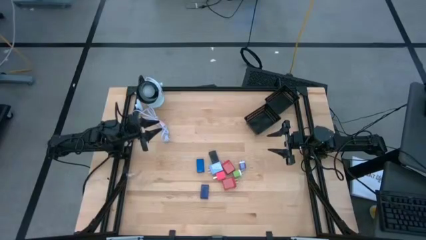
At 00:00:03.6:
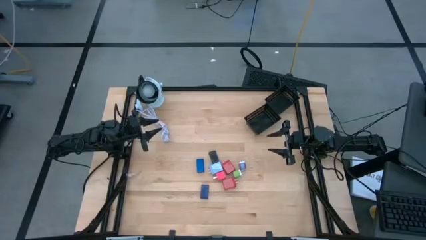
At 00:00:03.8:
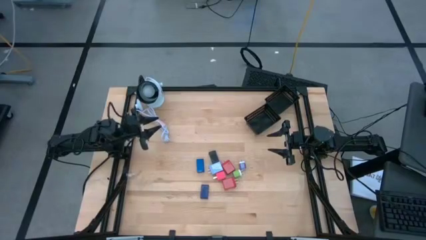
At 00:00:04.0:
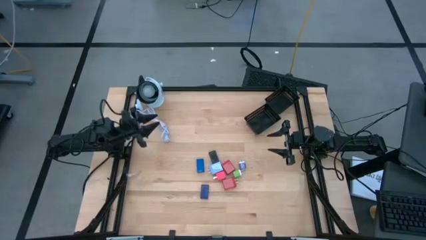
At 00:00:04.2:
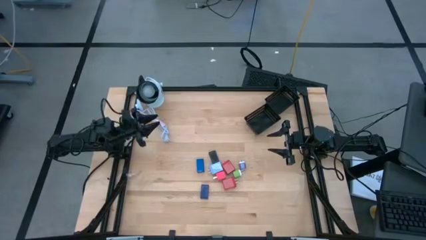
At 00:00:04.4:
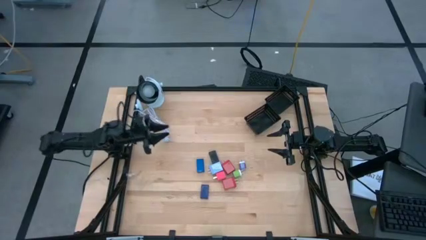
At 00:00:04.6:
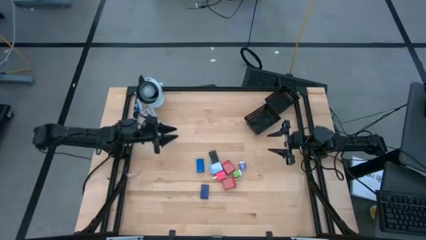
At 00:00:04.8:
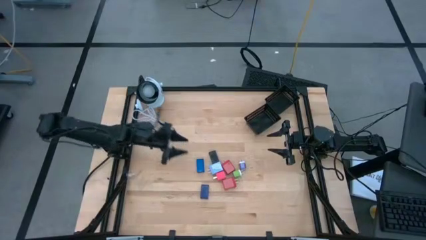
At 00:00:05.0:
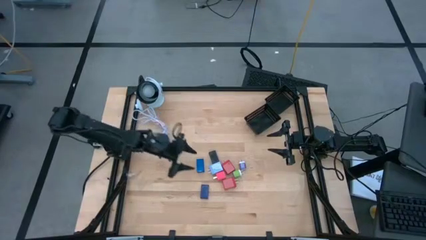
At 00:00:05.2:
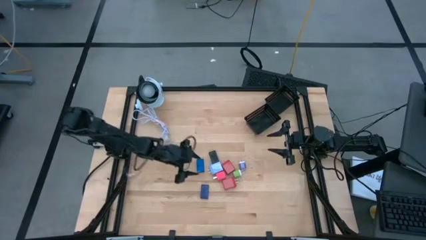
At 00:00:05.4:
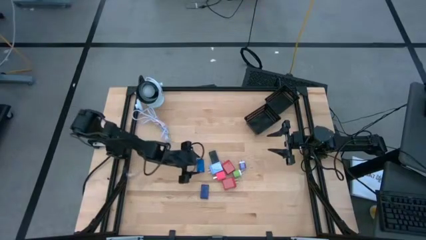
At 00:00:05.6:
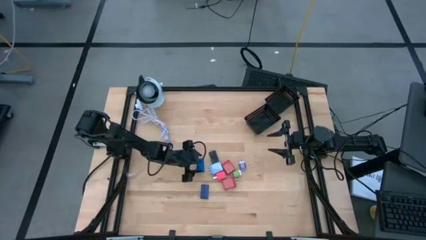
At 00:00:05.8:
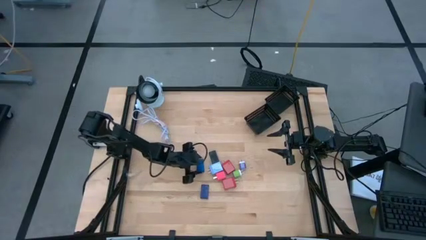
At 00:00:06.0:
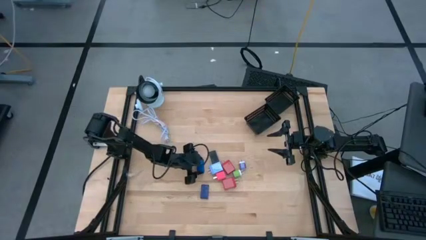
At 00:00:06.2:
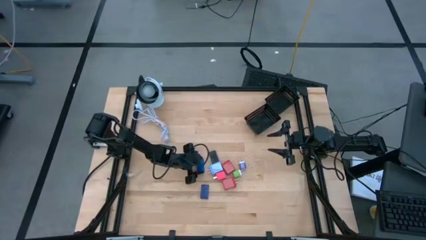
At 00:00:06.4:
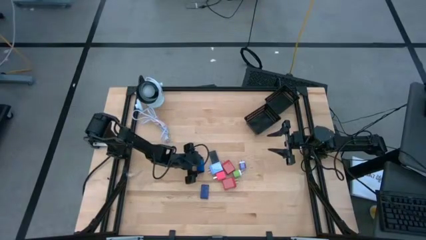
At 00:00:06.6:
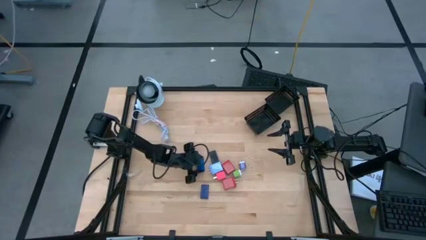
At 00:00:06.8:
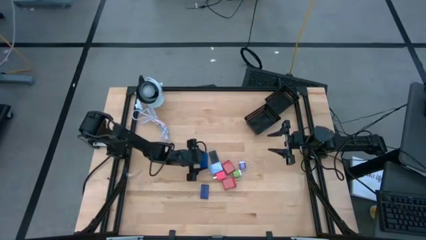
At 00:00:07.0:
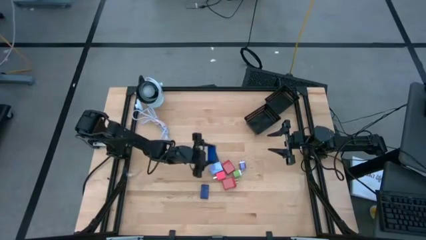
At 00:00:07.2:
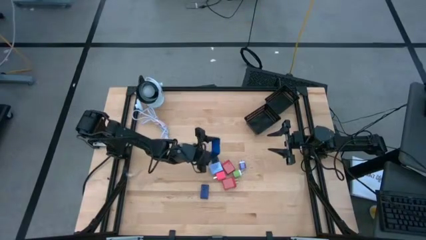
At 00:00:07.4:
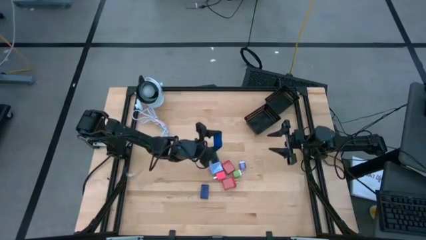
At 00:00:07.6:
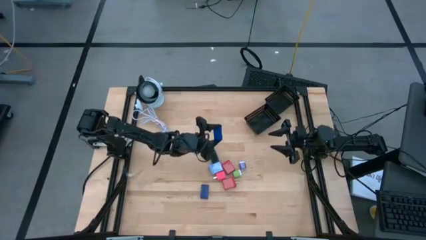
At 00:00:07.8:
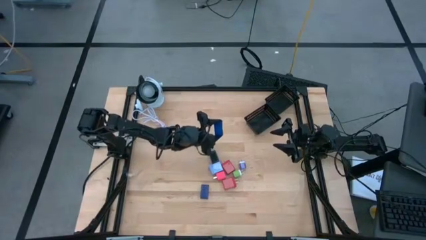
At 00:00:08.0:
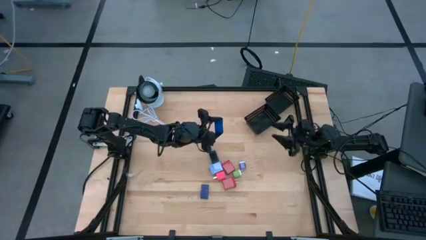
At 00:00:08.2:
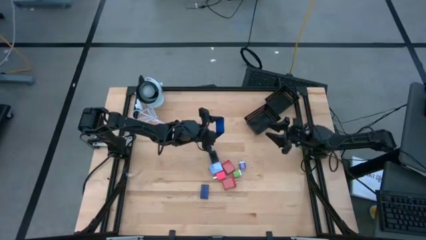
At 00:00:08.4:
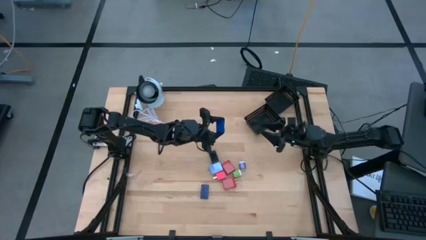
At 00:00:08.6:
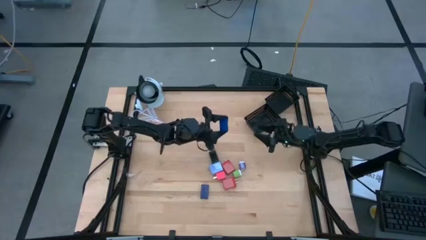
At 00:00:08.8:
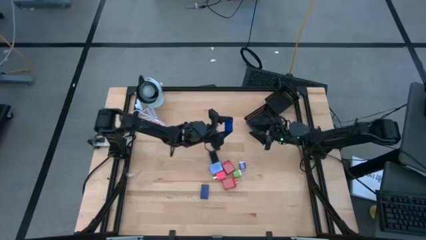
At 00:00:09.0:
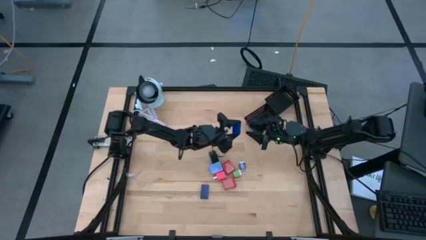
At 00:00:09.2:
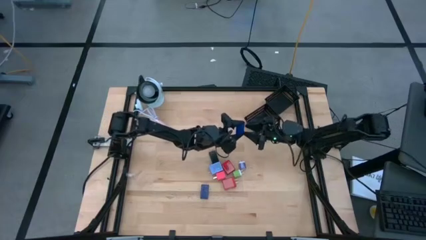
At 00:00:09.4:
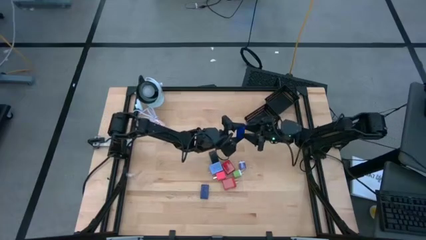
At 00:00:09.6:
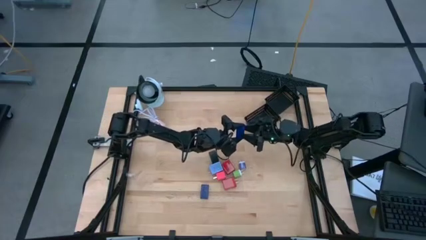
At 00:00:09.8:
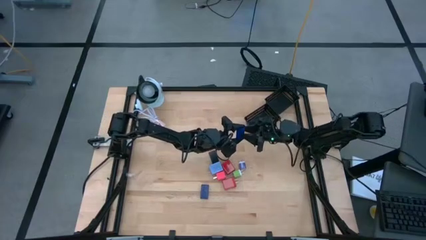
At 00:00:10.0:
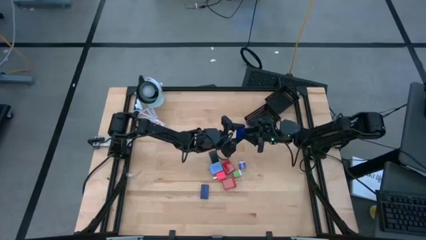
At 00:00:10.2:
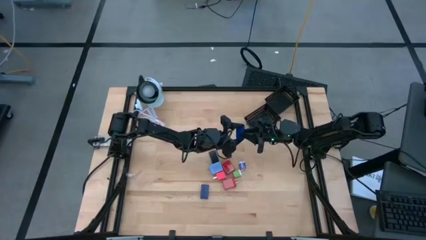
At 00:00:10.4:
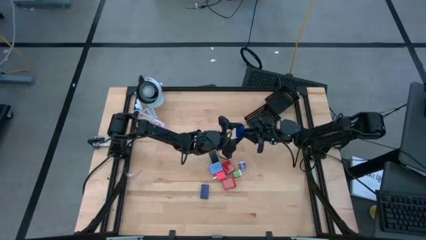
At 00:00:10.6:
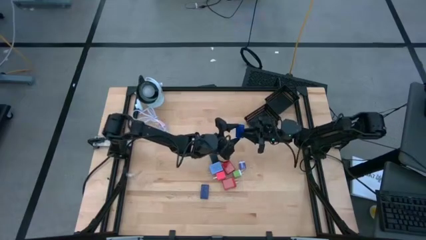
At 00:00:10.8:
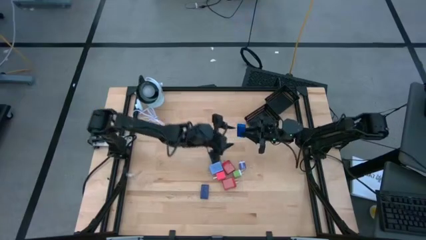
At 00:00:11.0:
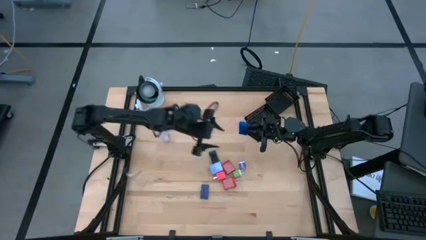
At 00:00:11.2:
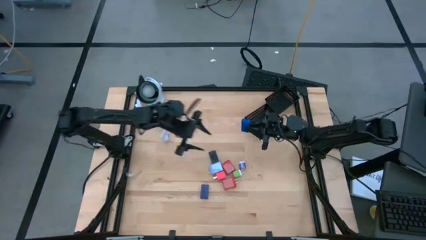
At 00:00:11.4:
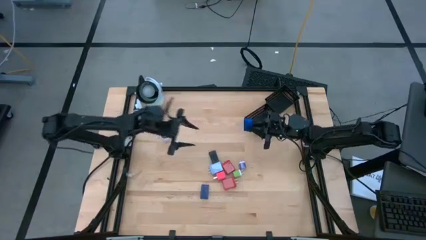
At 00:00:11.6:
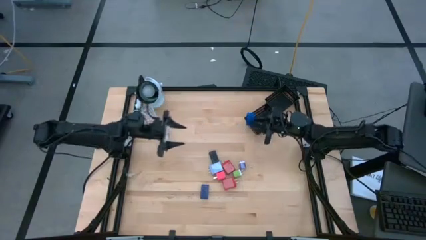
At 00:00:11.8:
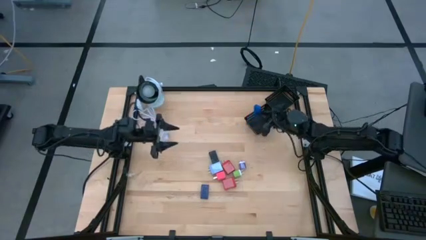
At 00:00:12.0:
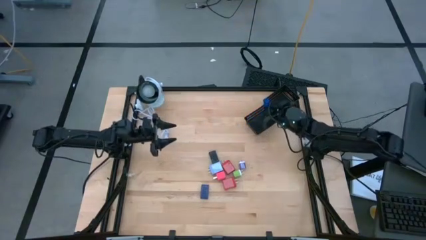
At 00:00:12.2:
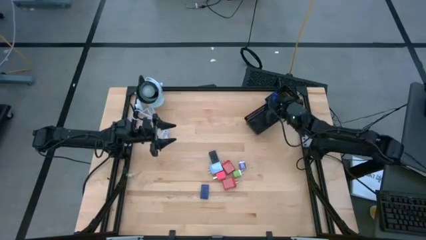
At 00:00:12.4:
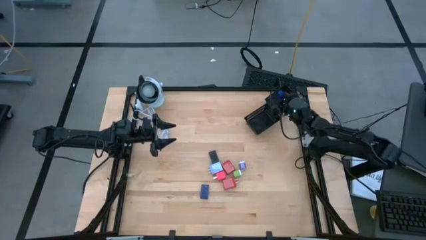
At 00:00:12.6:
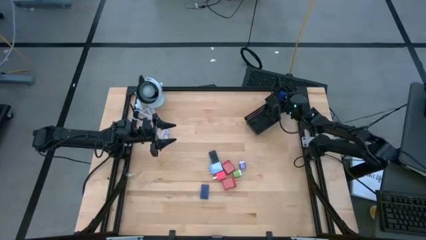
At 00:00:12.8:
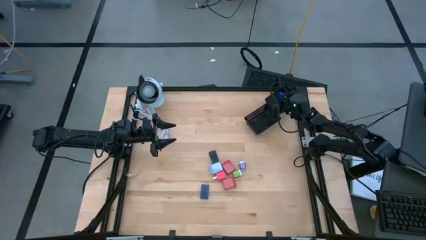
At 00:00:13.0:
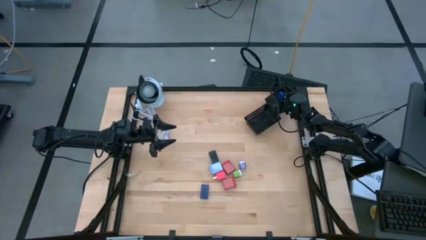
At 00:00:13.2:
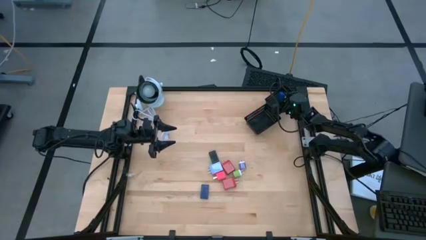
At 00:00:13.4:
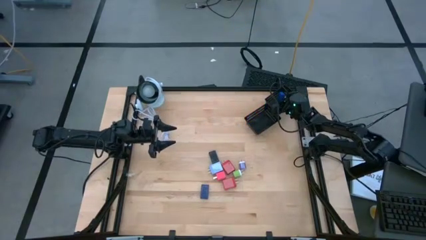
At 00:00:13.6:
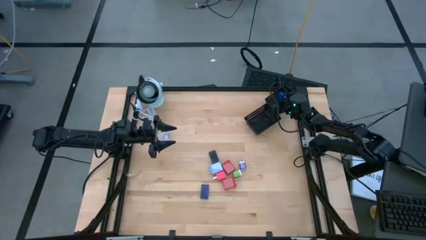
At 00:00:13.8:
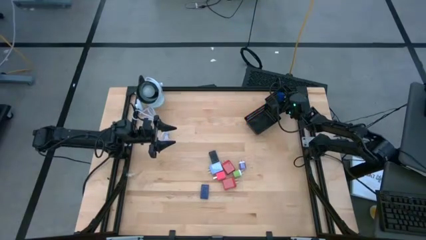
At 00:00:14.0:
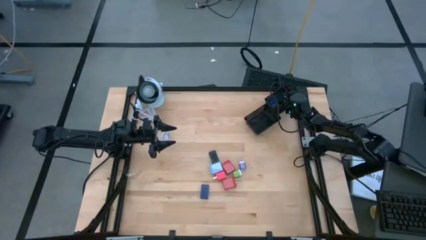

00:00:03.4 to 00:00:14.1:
Task: Pick & Place Office items
Put the blue digital timer into the top black bin

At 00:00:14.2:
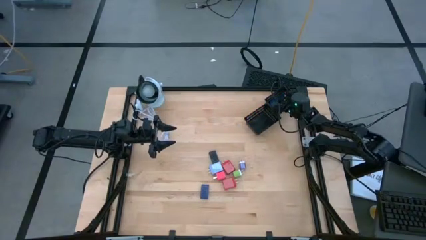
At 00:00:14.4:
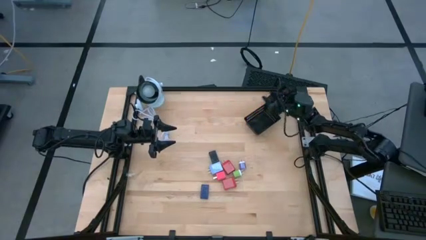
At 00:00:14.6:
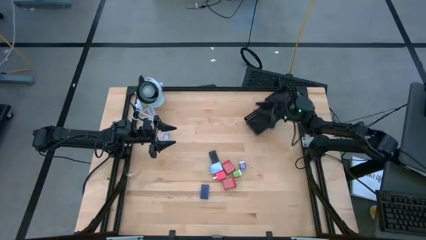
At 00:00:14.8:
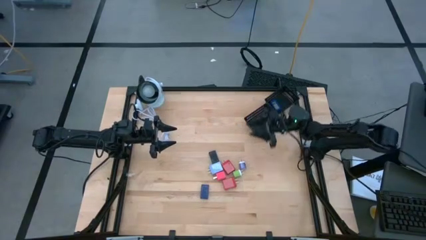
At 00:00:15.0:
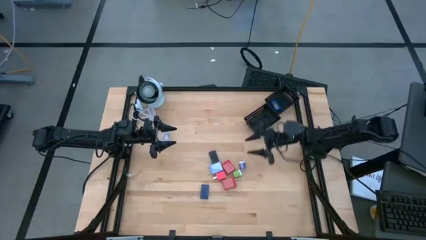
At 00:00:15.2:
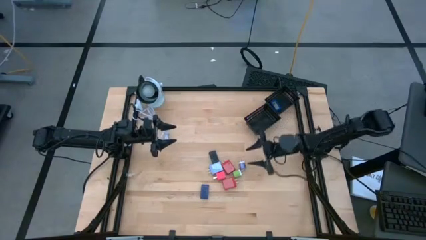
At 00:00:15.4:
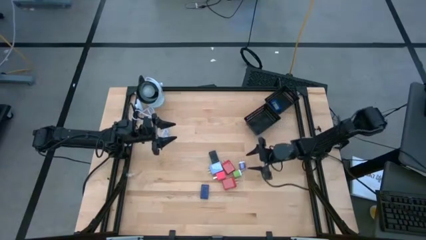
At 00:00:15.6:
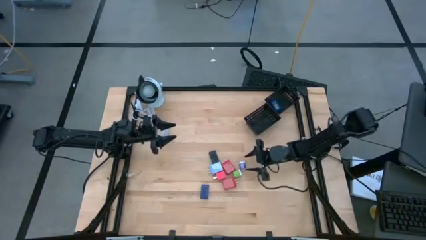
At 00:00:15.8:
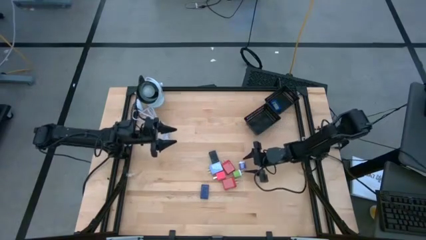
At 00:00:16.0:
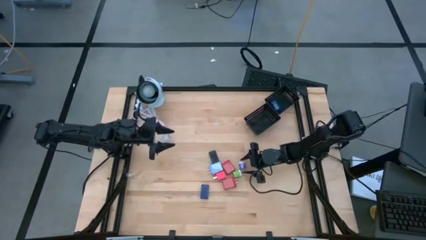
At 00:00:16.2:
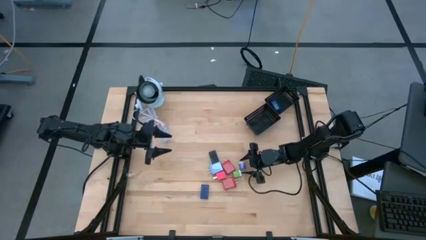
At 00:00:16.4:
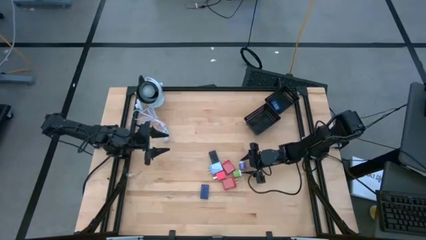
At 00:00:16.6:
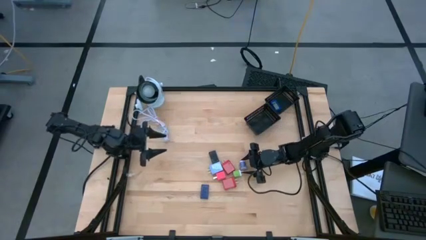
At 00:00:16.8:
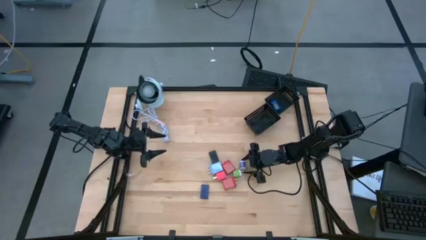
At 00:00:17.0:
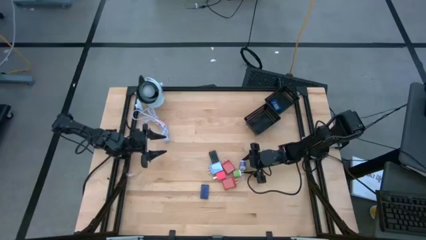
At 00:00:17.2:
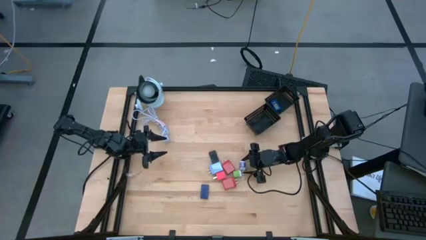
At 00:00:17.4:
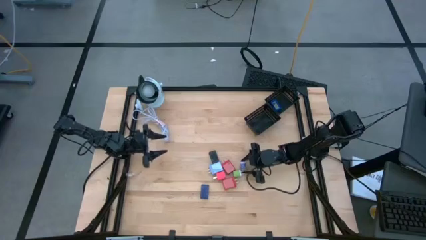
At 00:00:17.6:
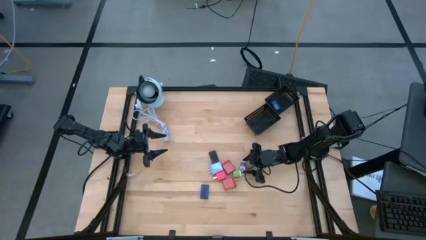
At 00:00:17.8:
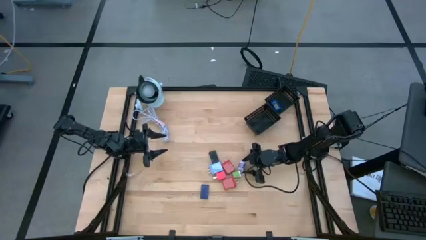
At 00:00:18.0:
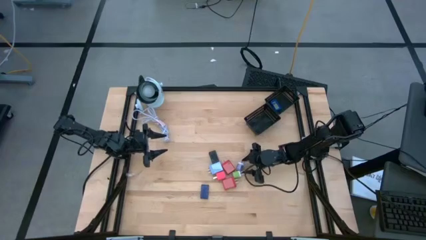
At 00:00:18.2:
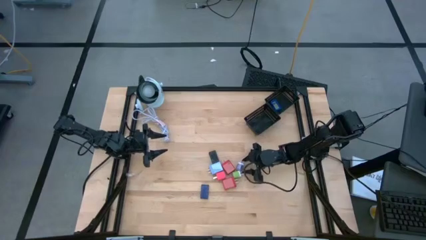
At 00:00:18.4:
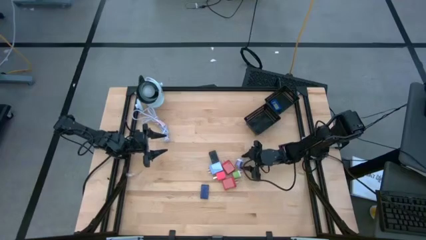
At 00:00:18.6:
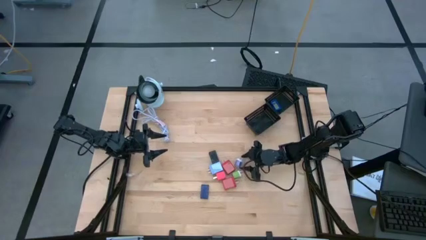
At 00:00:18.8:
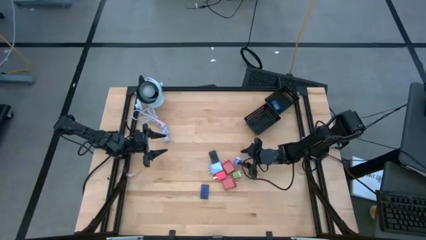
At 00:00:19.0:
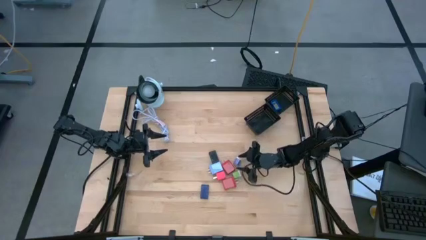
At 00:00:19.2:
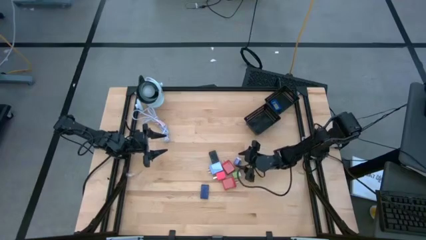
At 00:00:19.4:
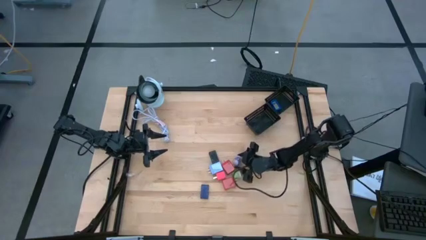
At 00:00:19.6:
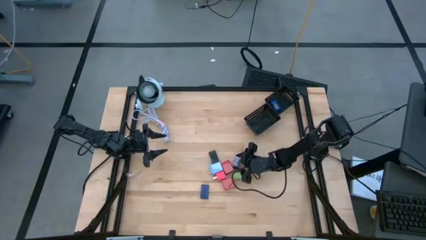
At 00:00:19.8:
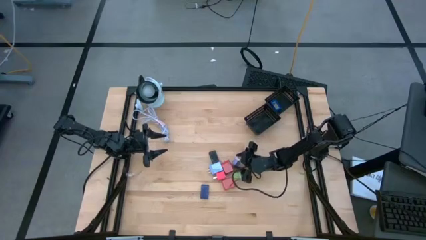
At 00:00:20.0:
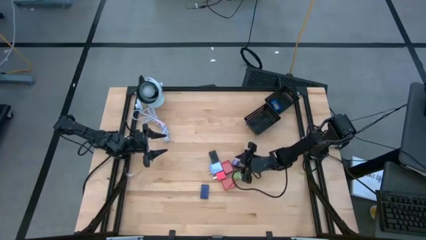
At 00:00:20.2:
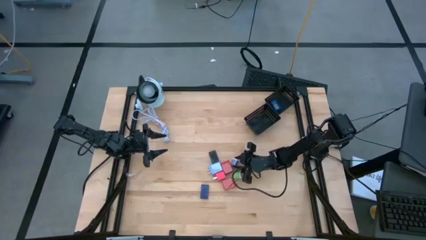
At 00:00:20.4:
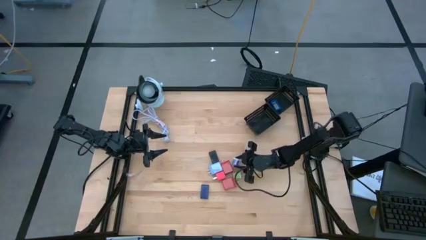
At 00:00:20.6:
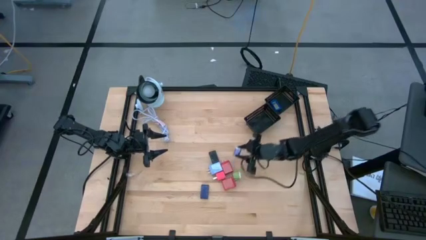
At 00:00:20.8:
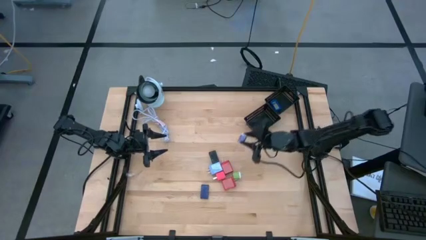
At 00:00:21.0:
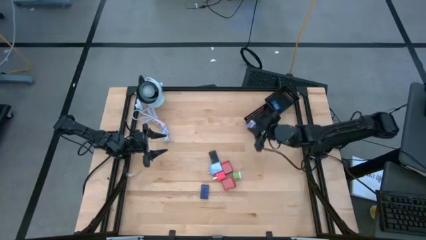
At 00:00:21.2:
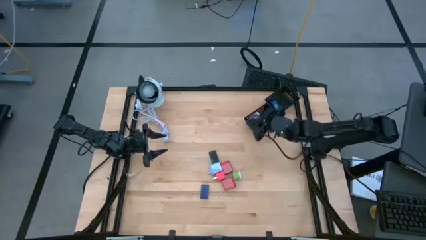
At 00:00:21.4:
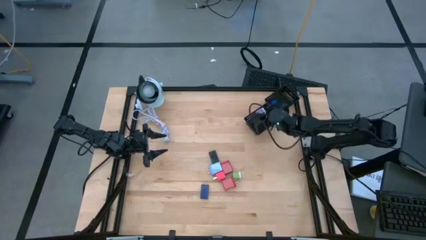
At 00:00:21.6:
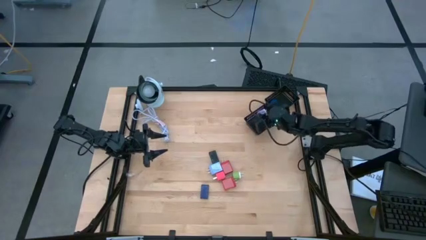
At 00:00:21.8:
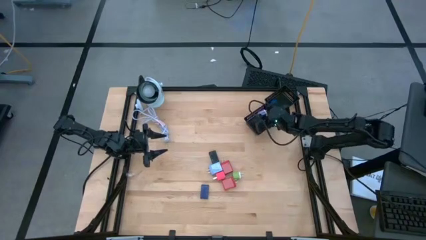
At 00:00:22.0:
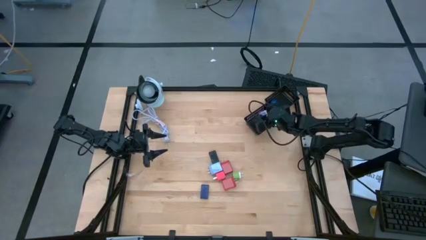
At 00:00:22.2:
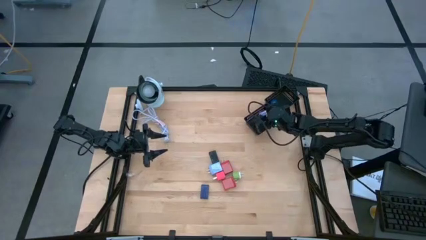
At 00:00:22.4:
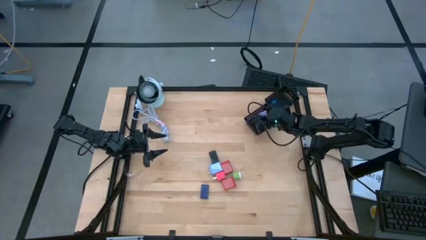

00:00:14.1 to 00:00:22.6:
Put the small blue charger adapter into the bottom black bin
